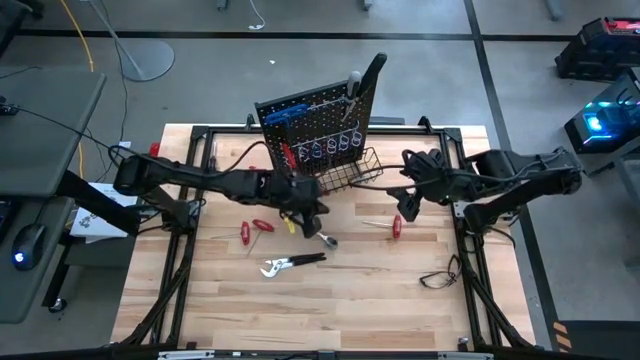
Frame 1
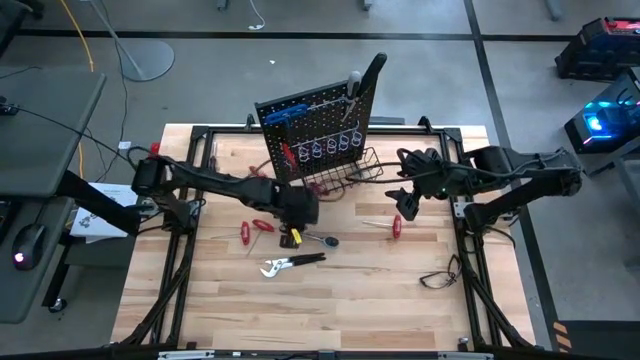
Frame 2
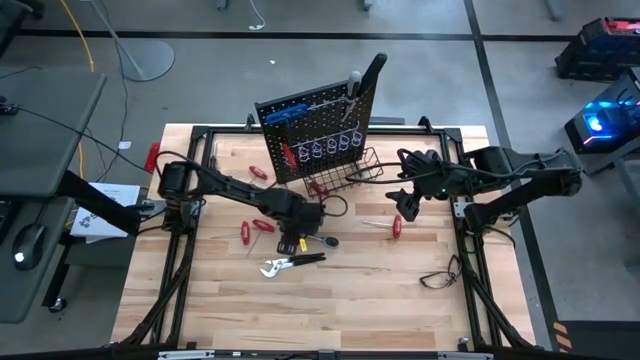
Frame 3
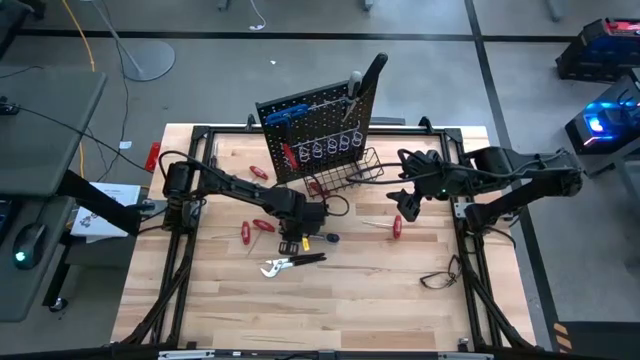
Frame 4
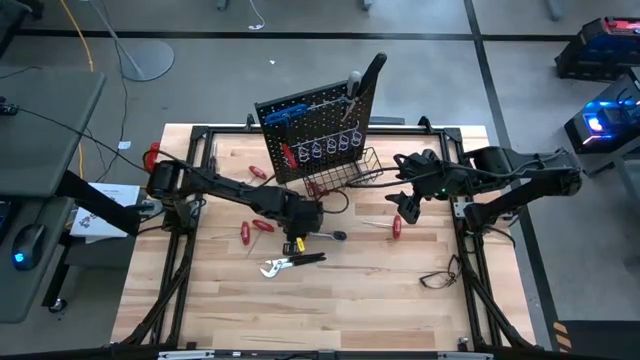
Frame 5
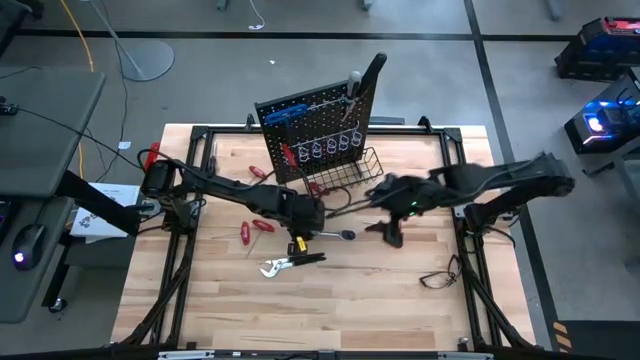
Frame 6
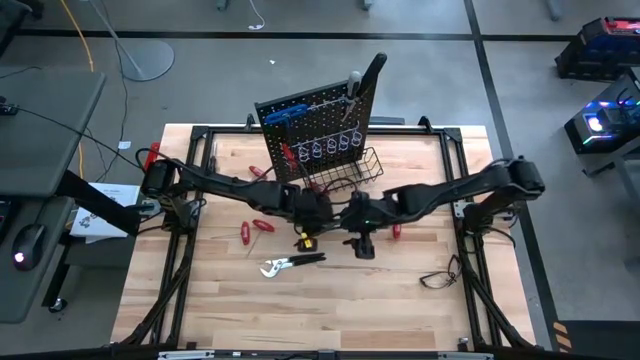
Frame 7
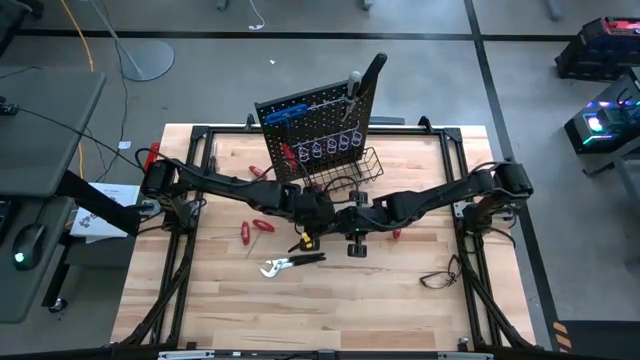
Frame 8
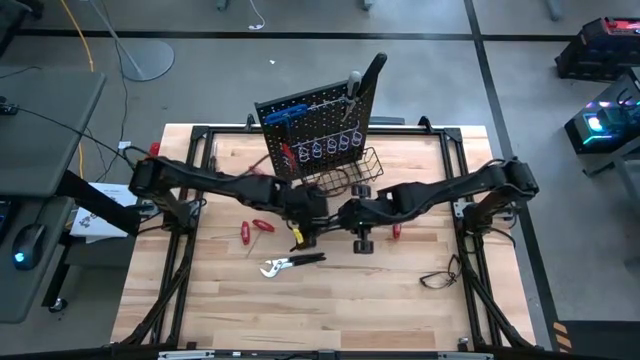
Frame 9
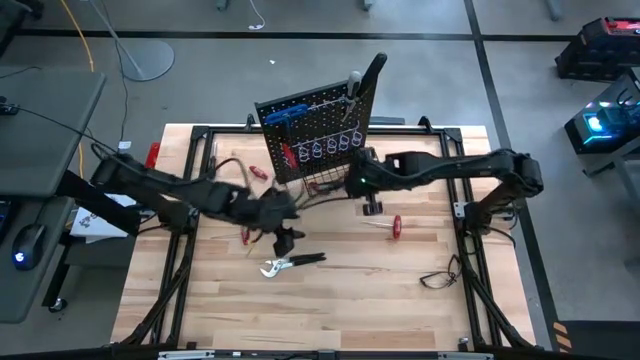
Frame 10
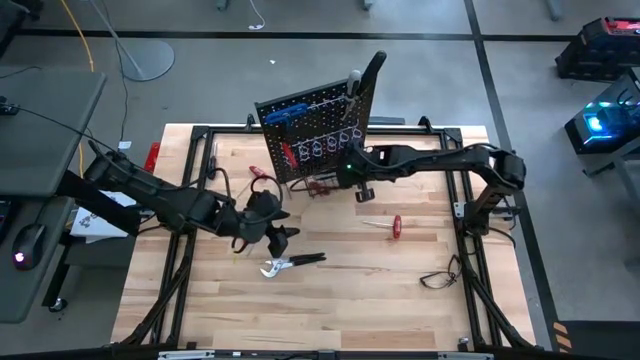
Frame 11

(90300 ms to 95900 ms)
Task: Hang tools onto peg board
Put the gray ratchet wrench into the wire basket on the peg board

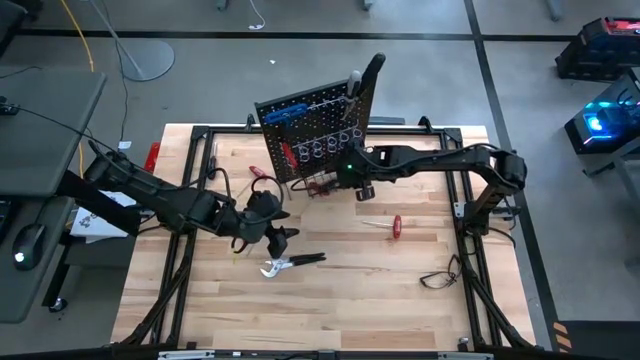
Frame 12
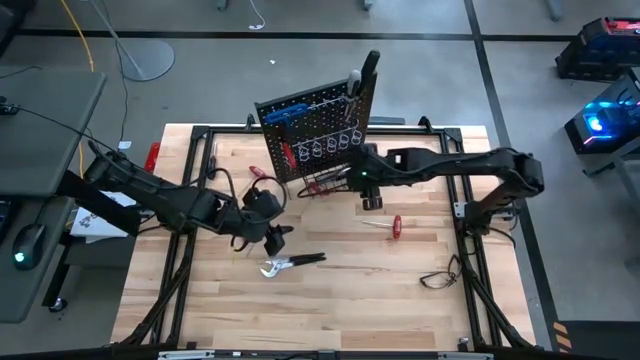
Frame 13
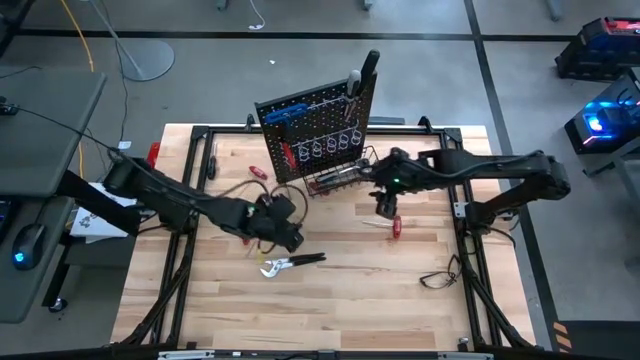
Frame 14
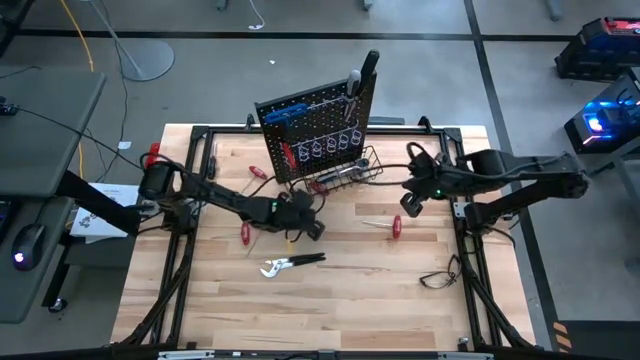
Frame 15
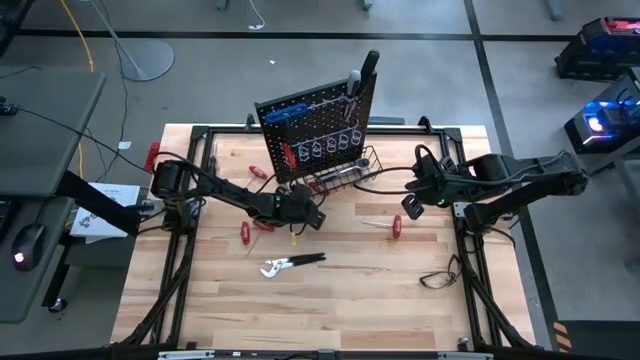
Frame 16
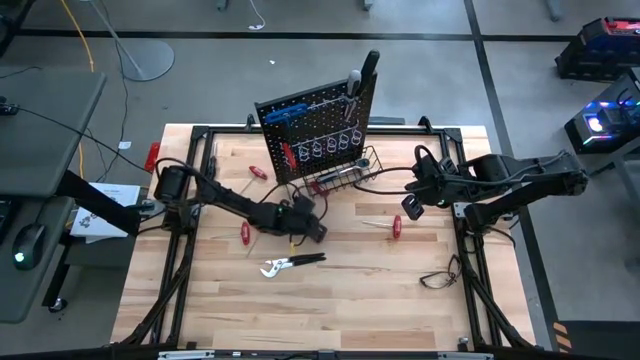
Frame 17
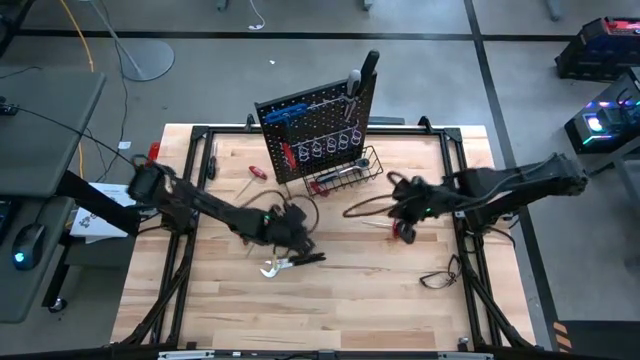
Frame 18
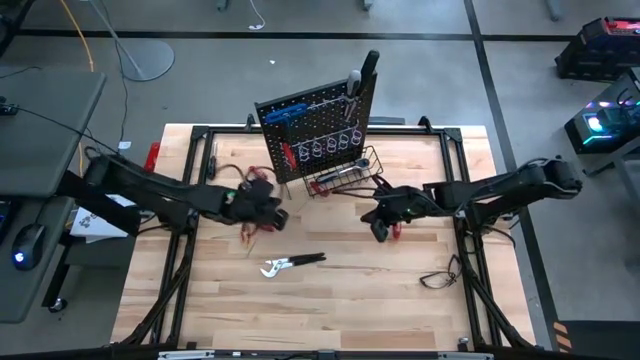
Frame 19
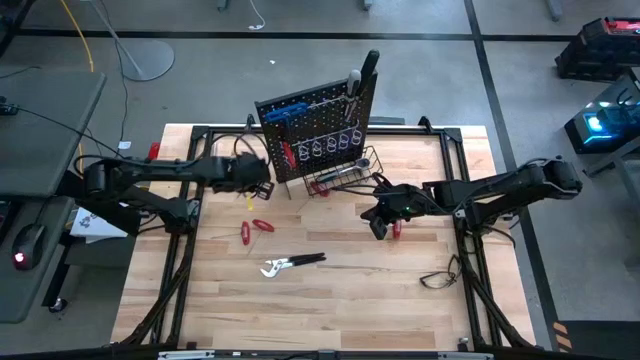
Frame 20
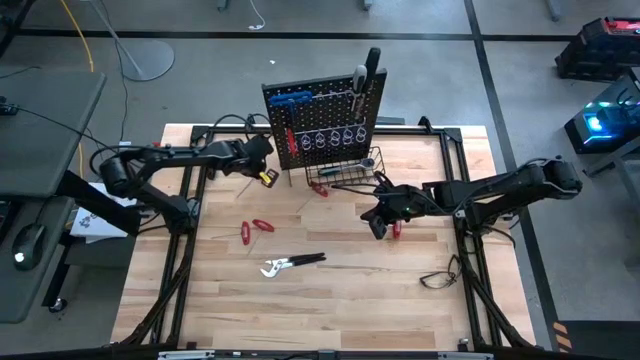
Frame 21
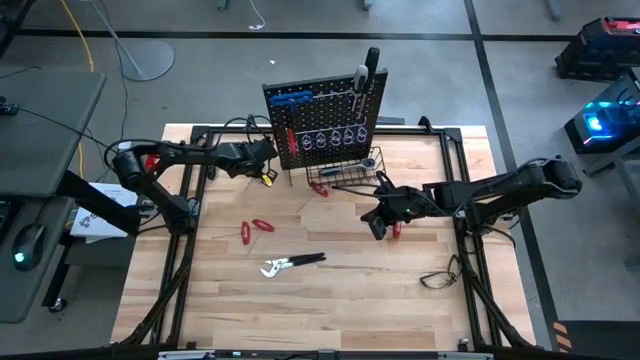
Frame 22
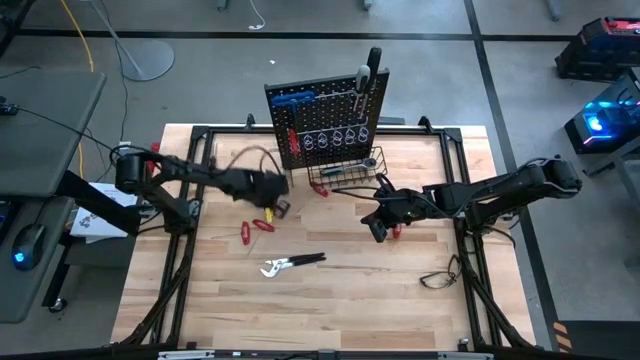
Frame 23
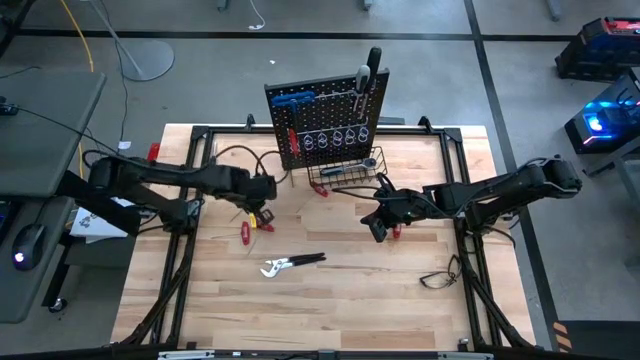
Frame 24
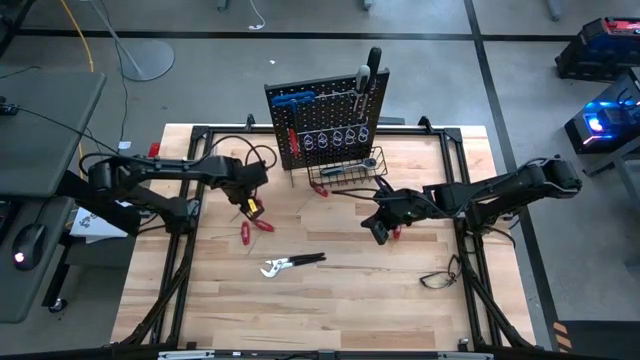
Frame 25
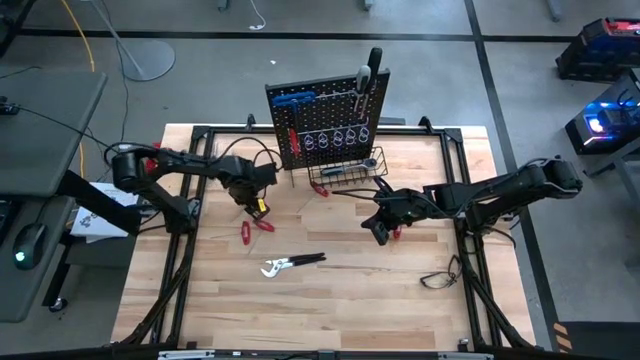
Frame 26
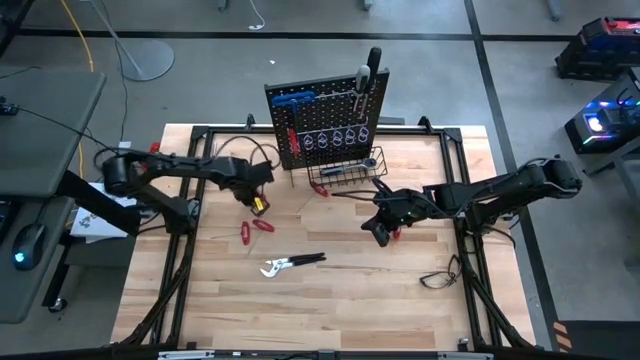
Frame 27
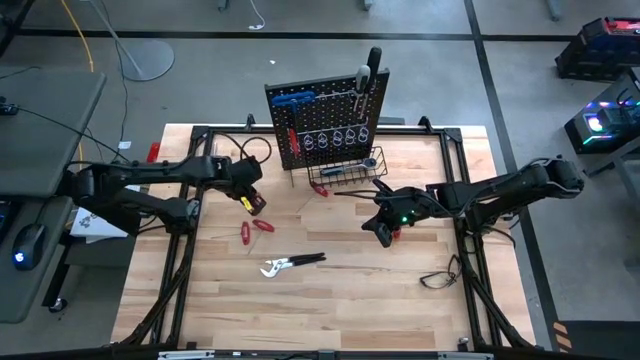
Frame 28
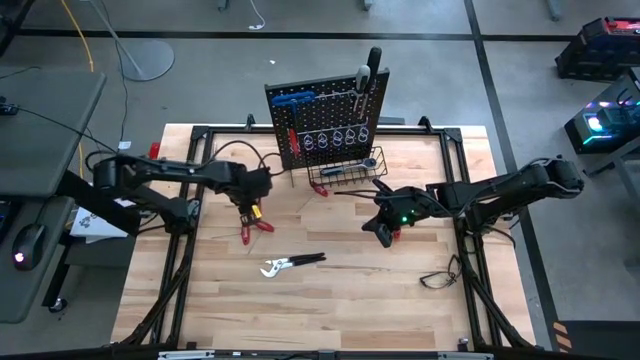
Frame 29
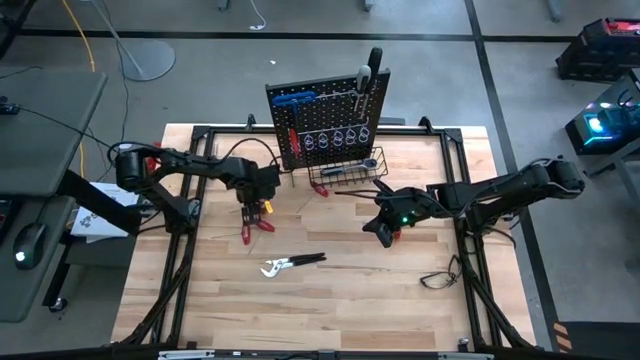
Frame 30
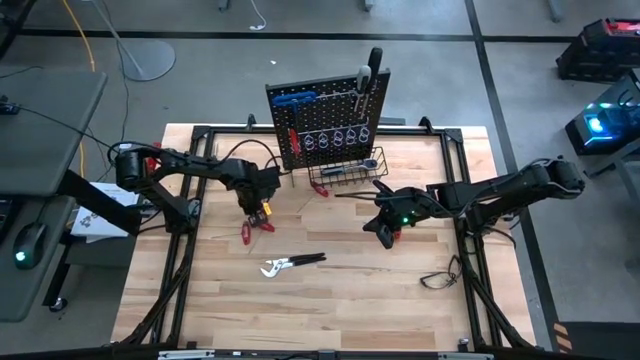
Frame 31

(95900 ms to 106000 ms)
Hang the red allen wrench on the peg board

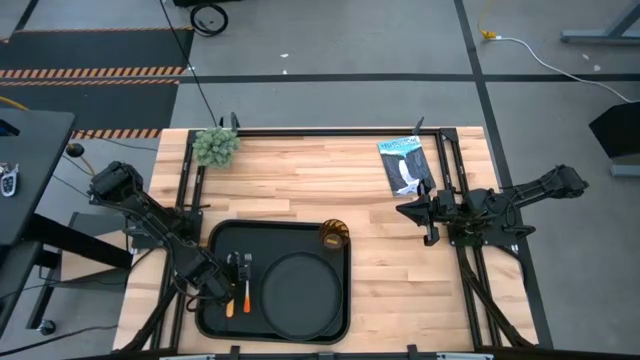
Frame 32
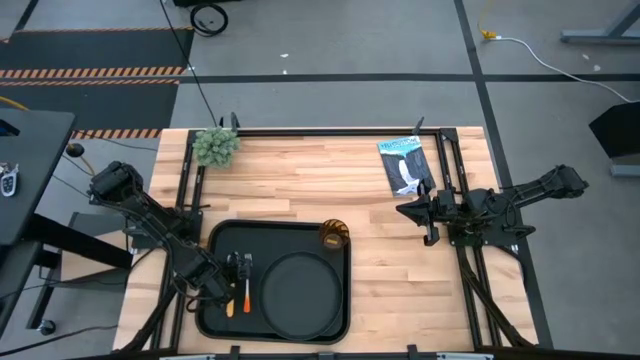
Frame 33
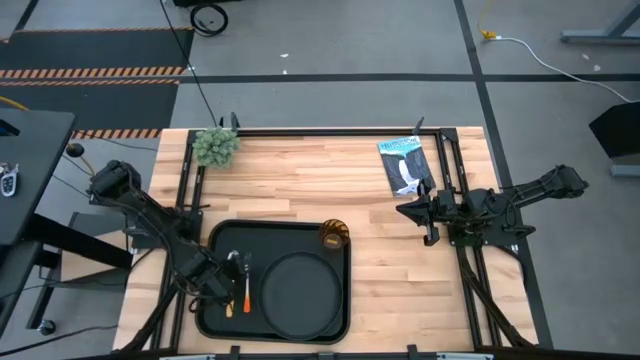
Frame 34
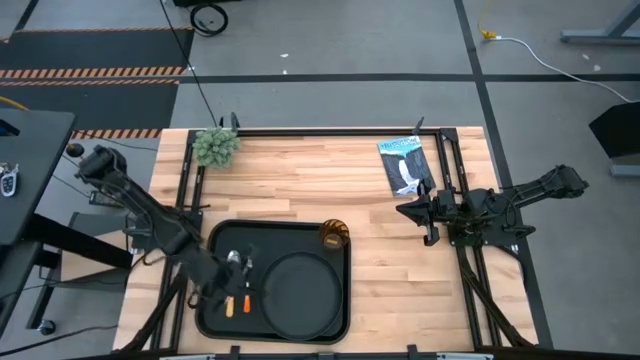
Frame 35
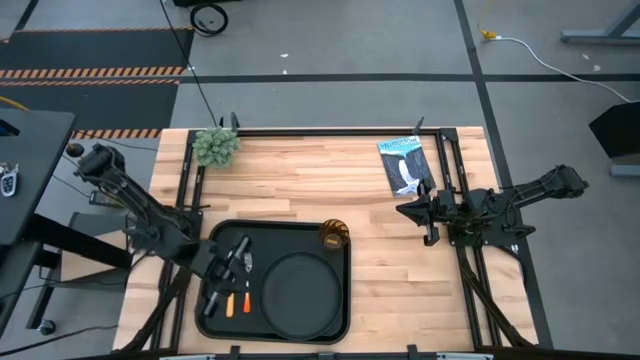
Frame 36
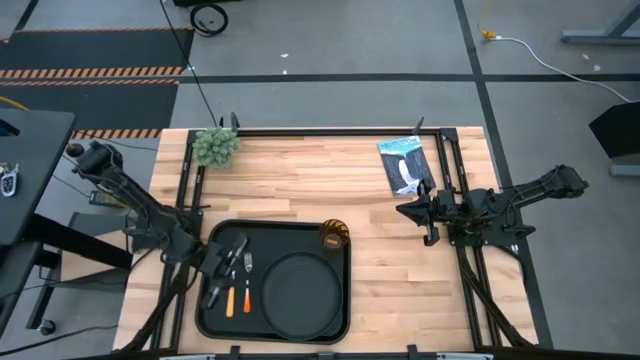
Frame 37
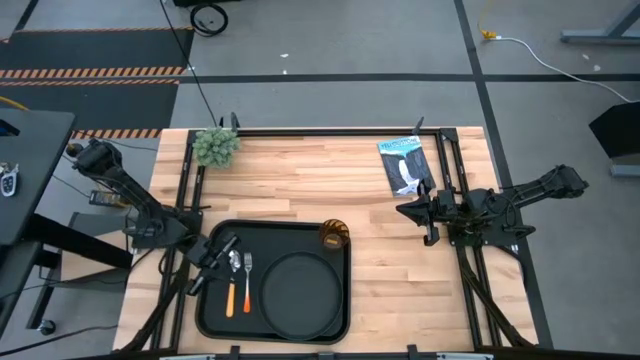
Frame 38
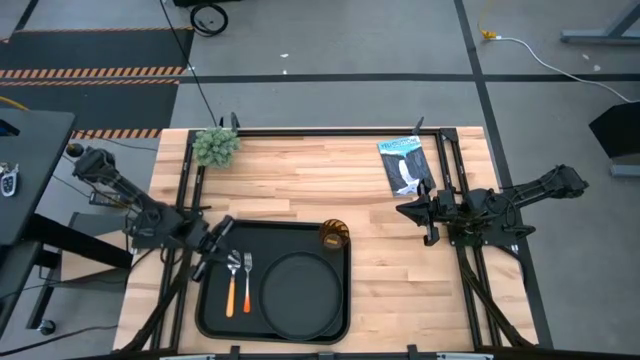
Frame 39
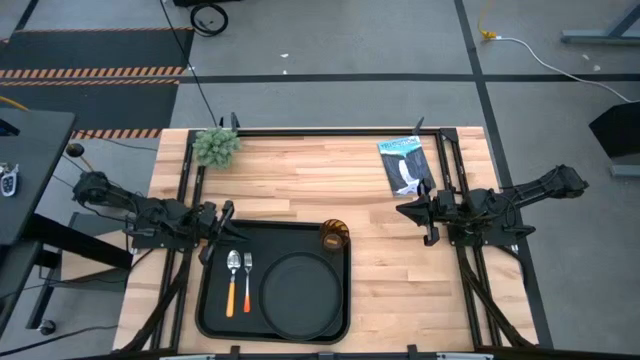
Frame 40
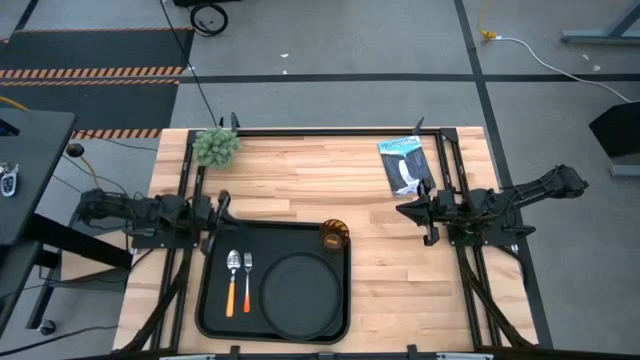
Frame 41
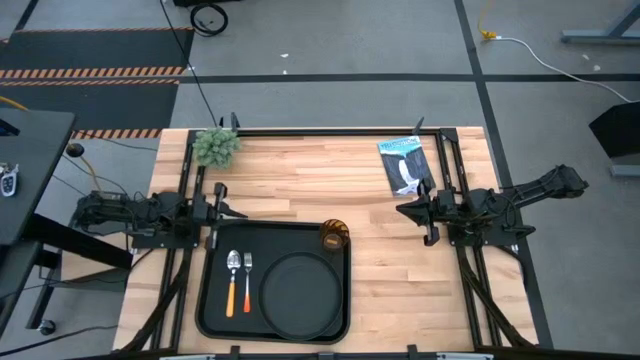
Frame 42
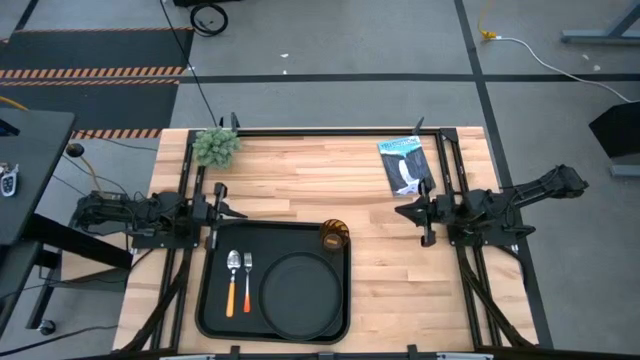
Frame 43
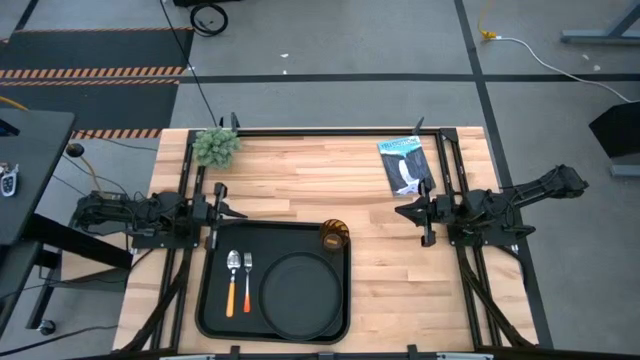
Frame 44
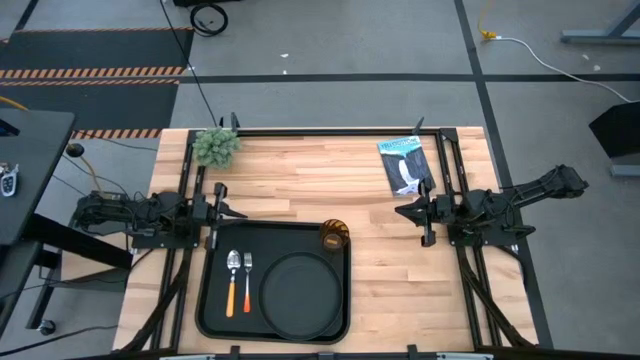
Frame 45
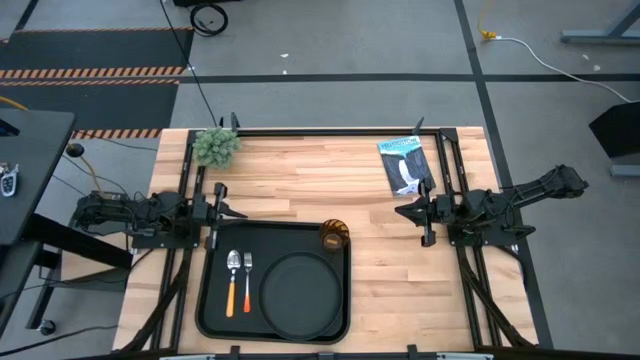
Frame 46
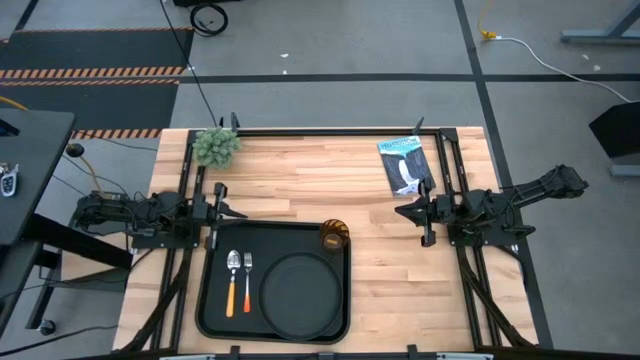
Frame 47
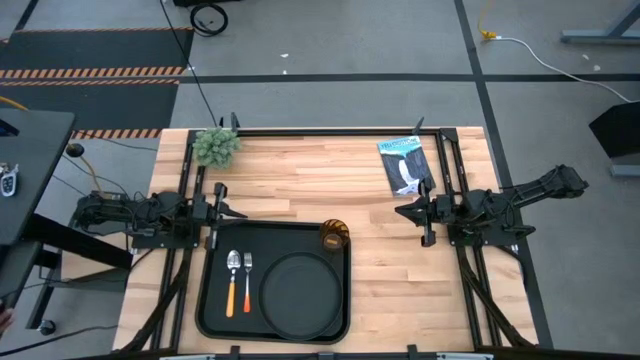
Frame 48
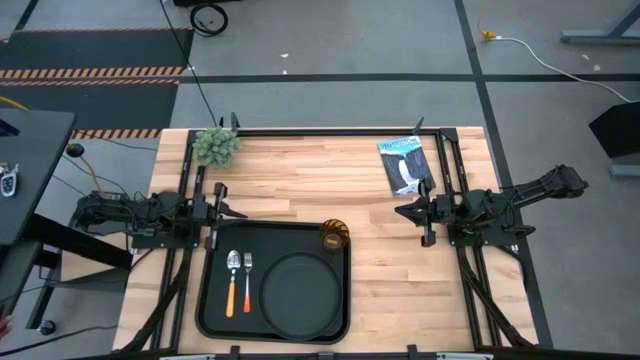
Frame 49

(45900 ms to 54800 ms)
Task: Pick and place plate/cup/fork/spoon on tray
Return to Home Position
